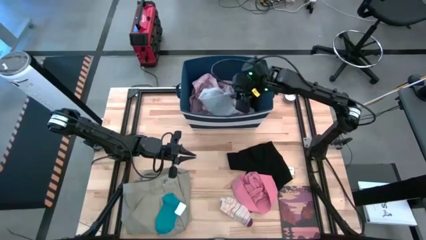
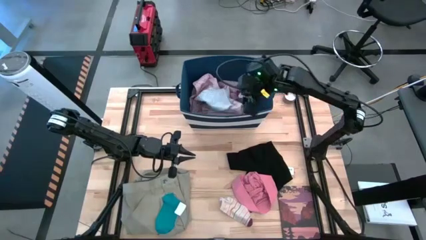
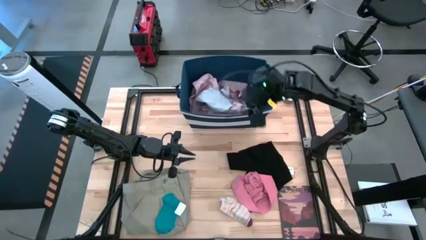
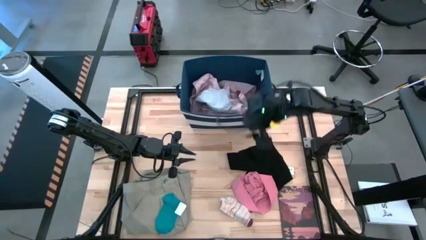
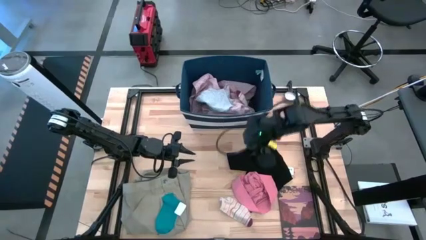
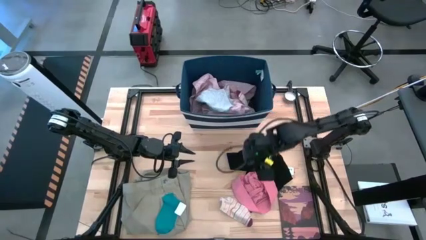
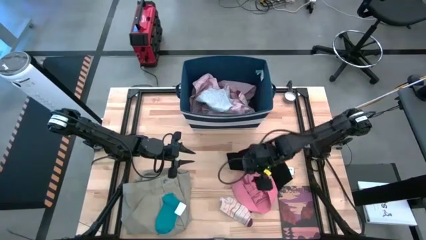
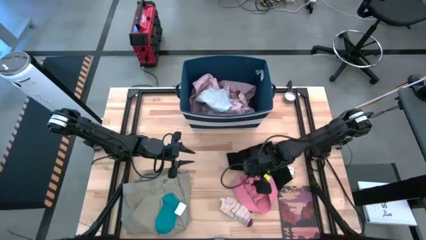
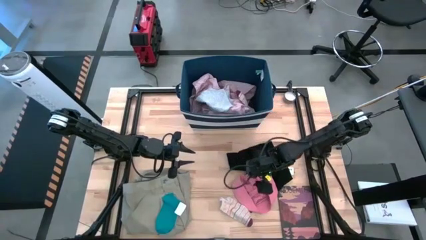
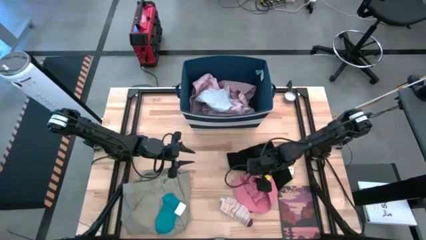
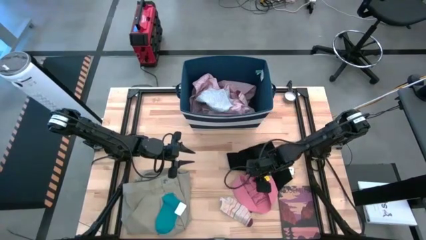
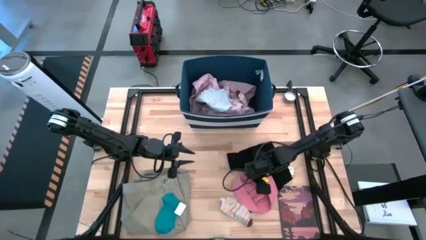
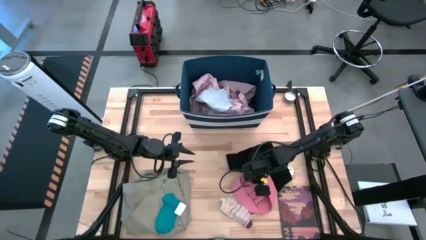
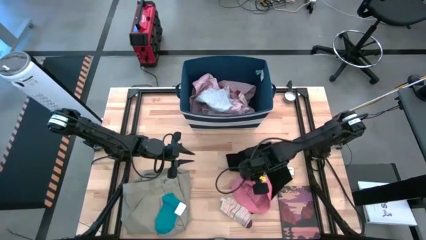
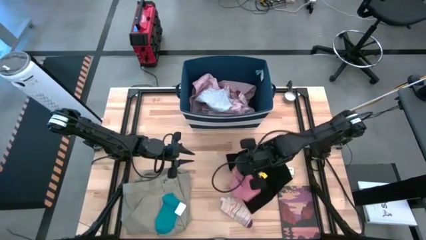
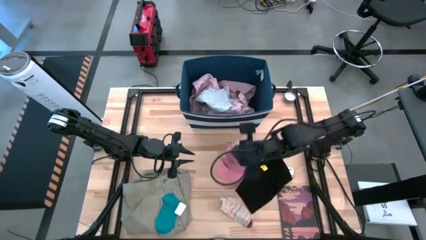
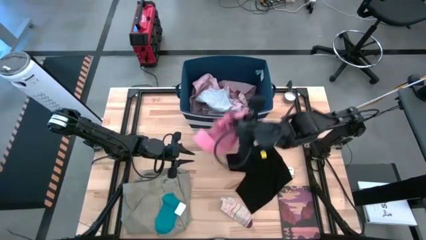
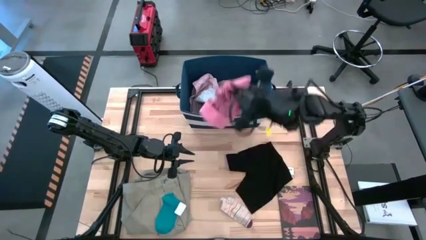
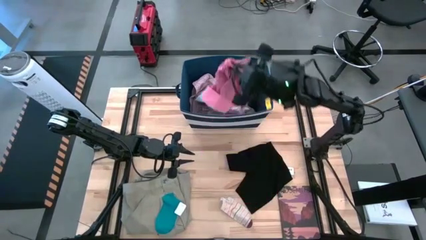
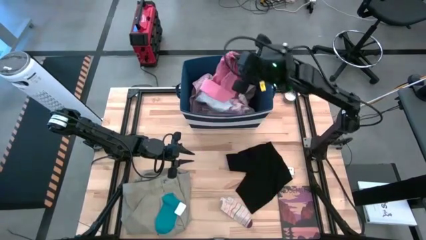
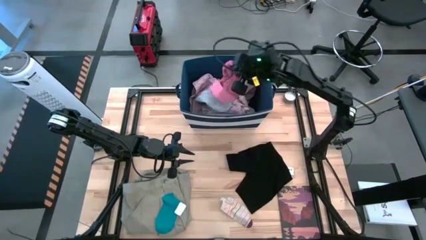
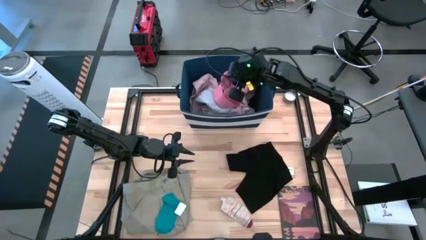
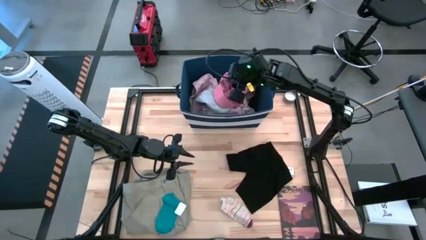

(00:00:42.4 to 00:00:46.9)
Task: Sort clothes
Put the pink shirt into the blue laundry bin

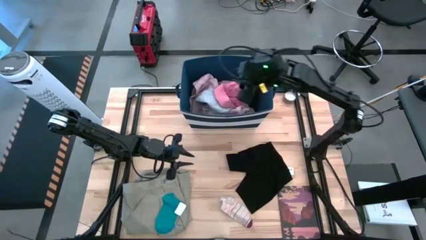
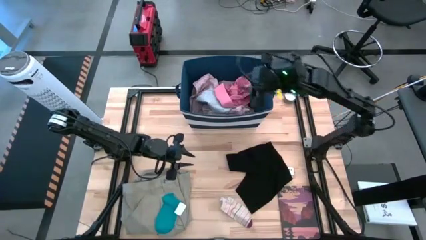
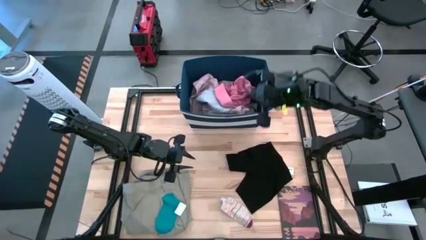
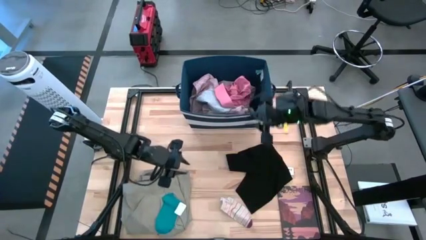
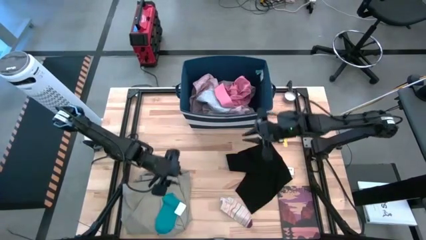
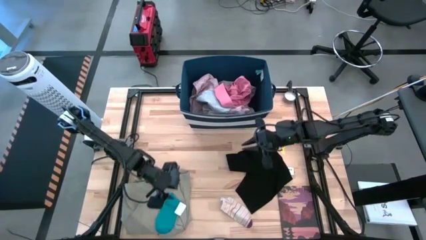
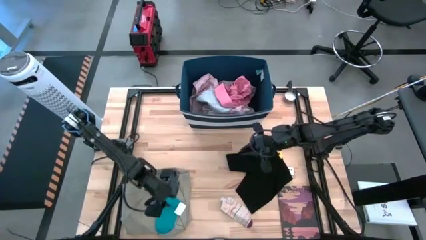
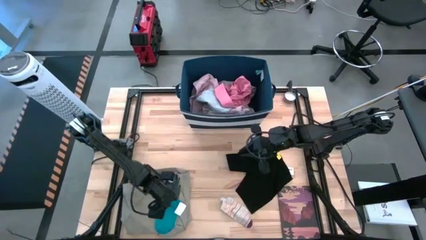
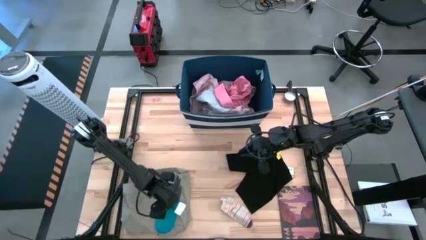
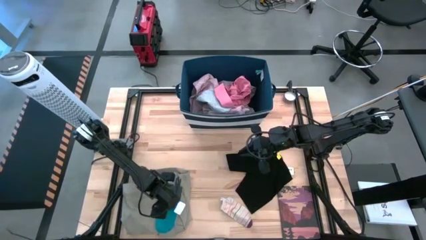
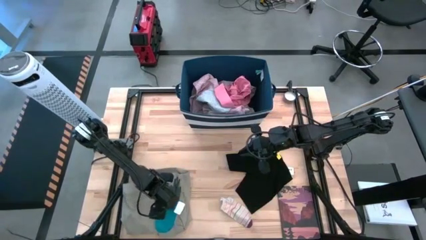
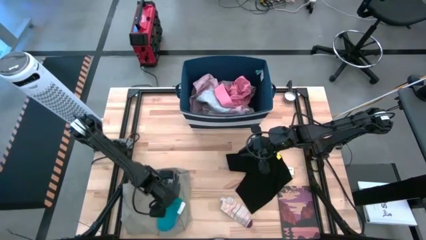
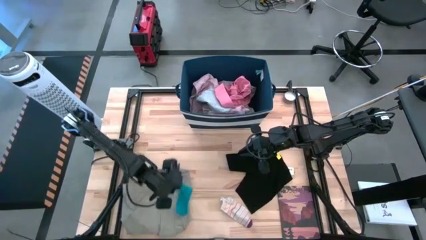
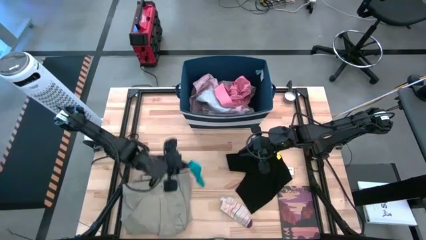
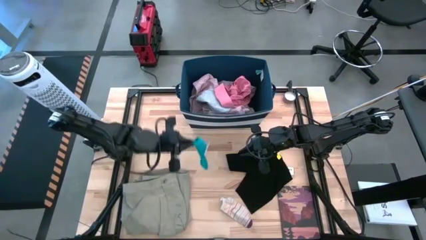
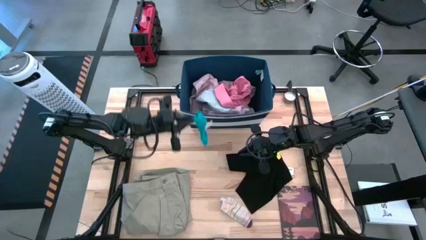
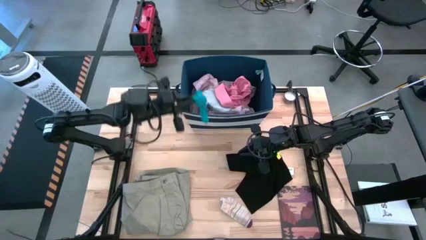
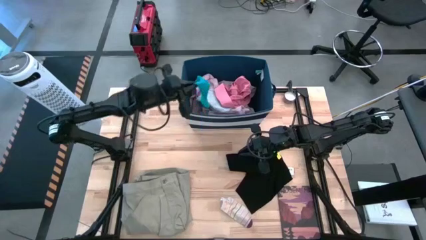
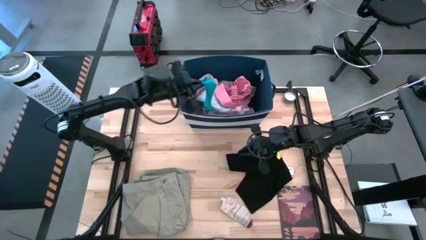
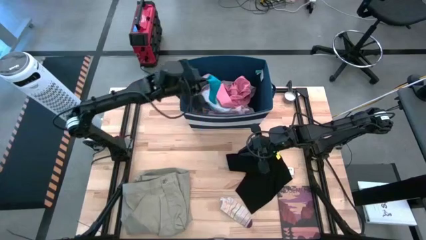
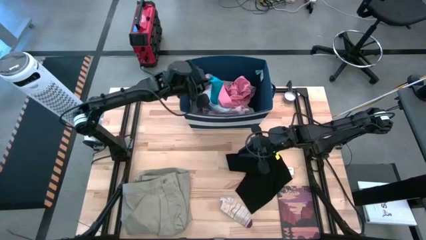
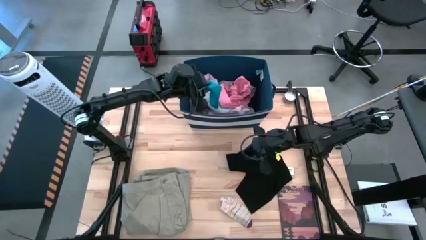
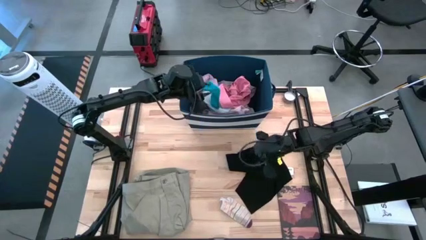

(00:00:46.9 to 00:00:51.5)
Put the blue sock into the blue laundry bin

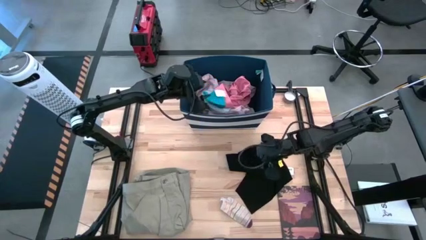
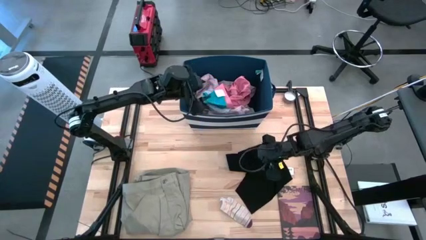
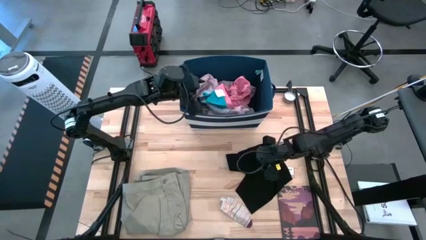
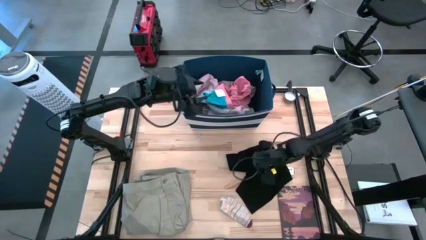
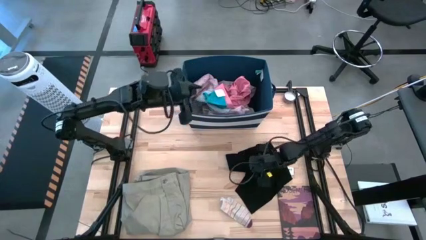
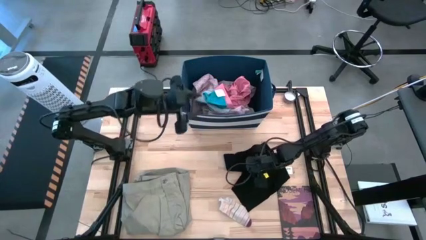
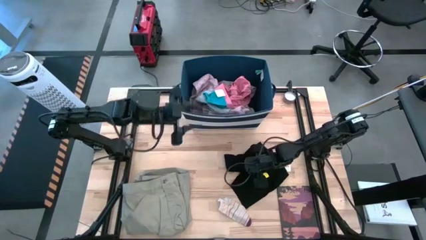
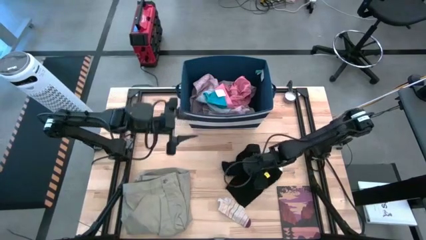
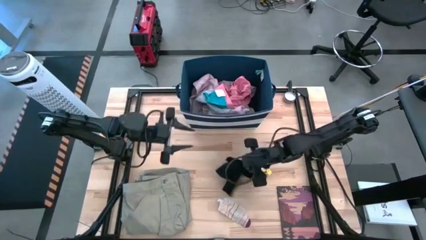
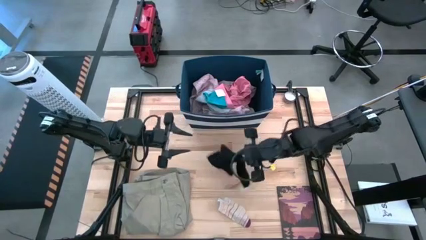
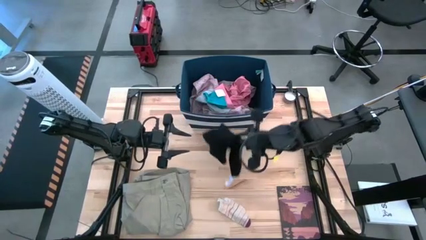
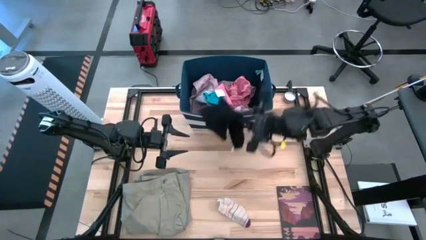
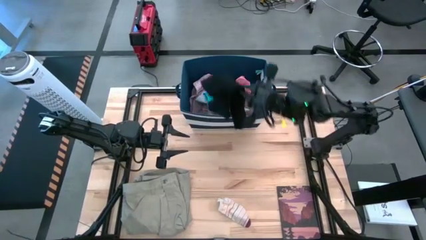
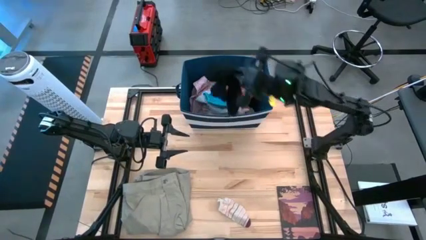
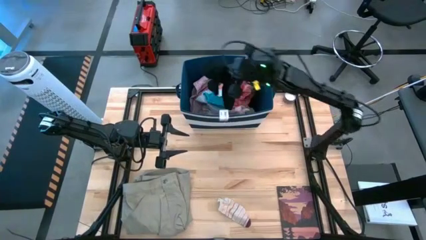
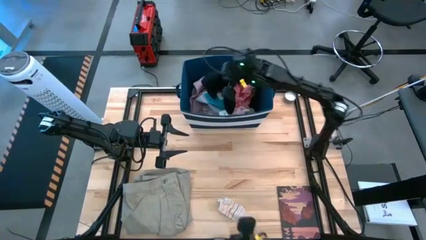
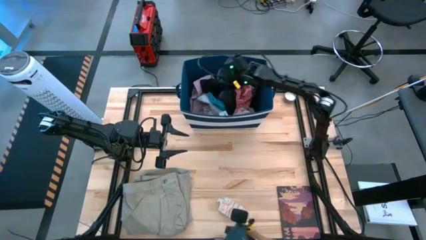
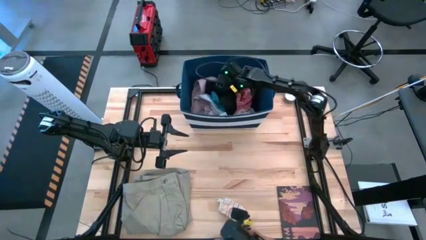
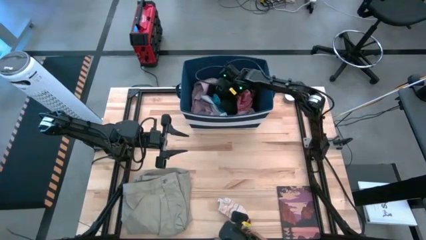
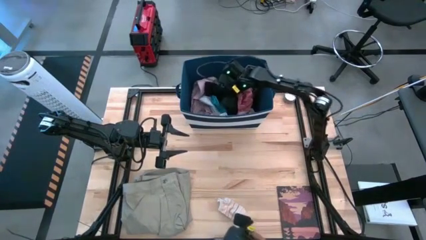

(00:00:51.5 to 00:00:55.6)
Put the black short into the blue laundry bin

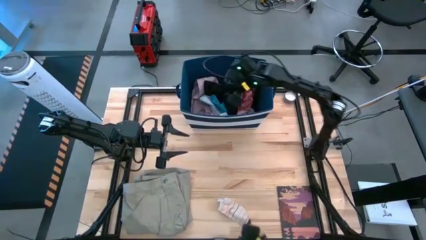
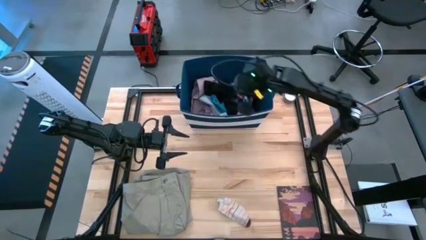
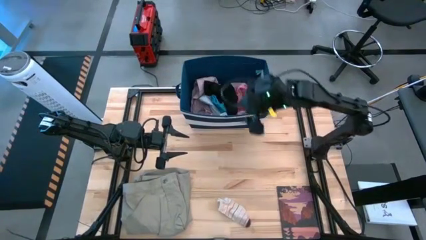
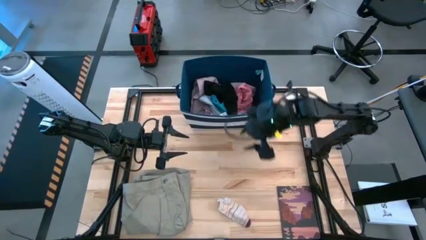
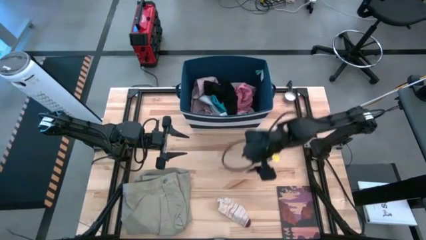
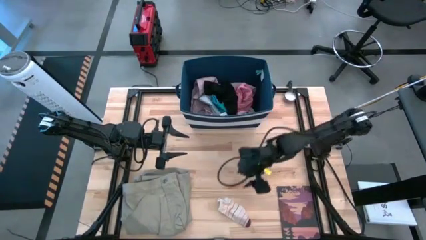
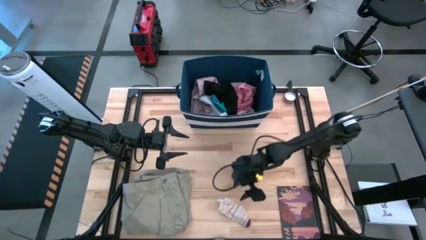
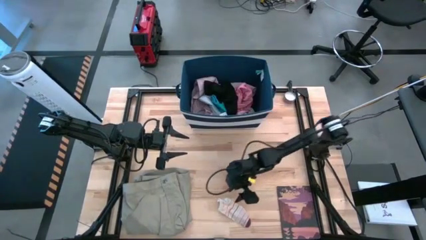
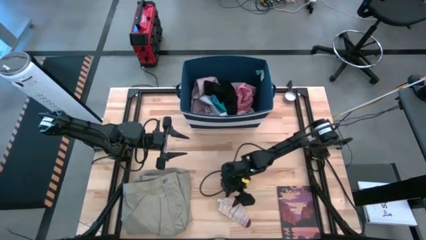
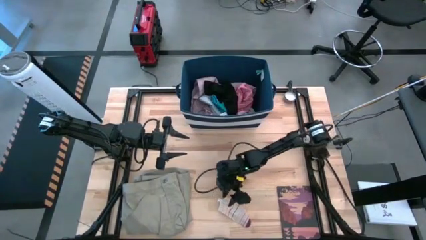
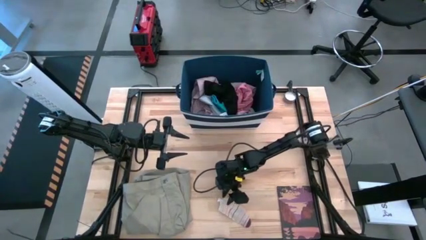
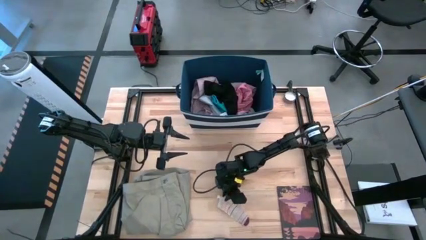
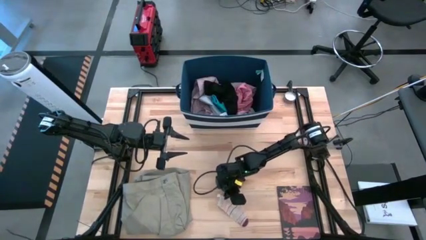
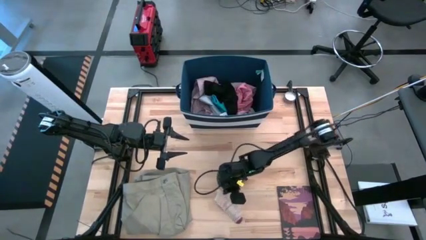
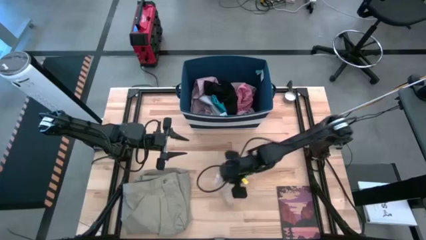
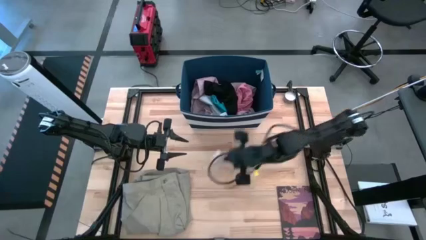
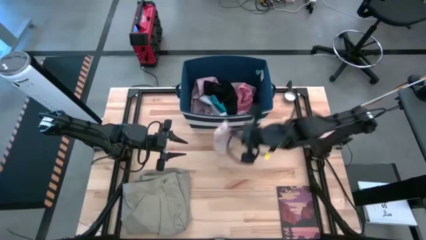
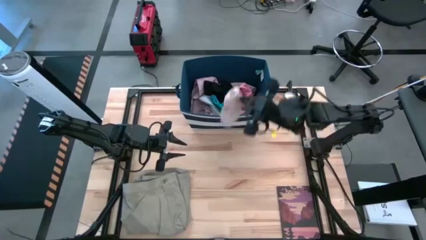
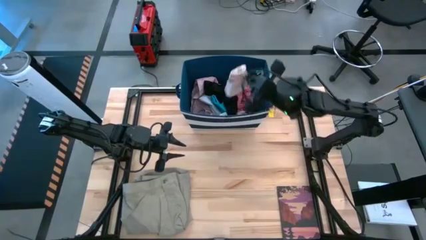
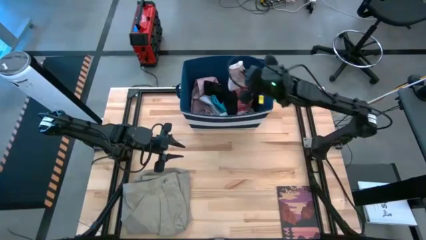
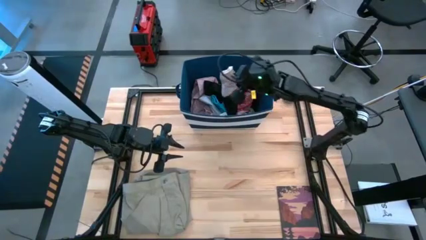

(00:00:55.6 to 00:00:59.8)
Put the white striped sock into the blue laundry bin
